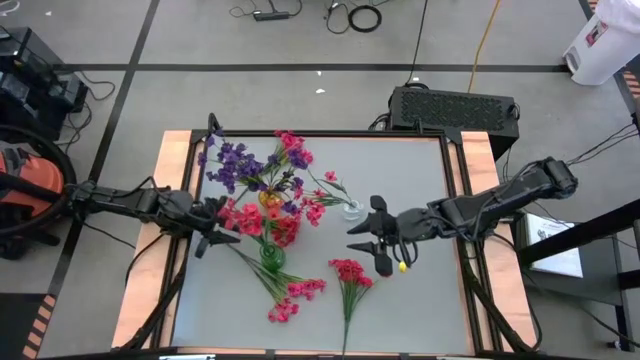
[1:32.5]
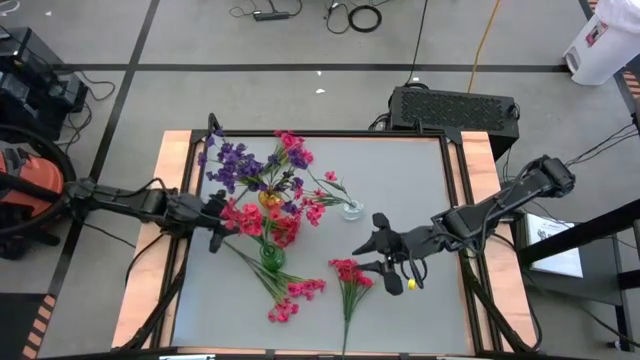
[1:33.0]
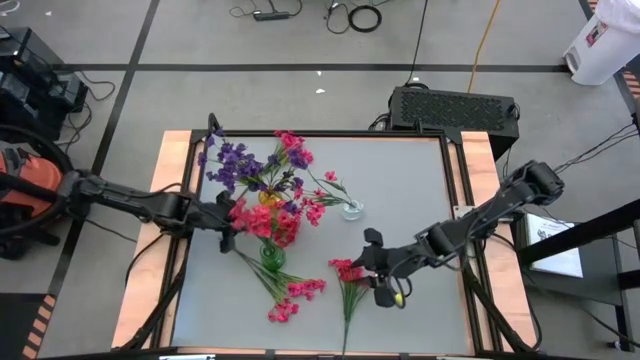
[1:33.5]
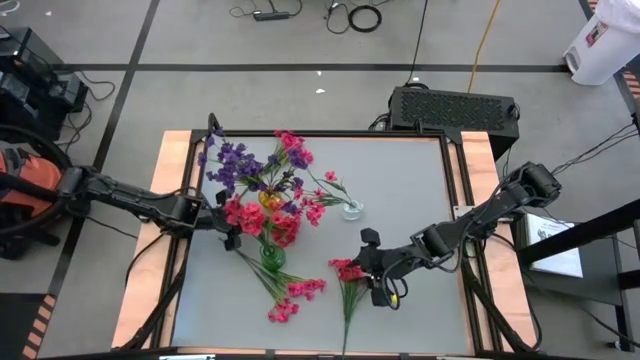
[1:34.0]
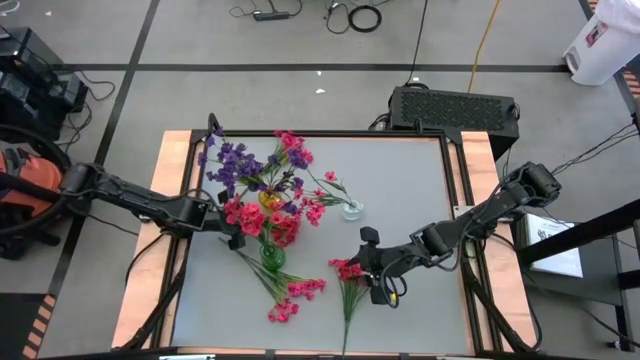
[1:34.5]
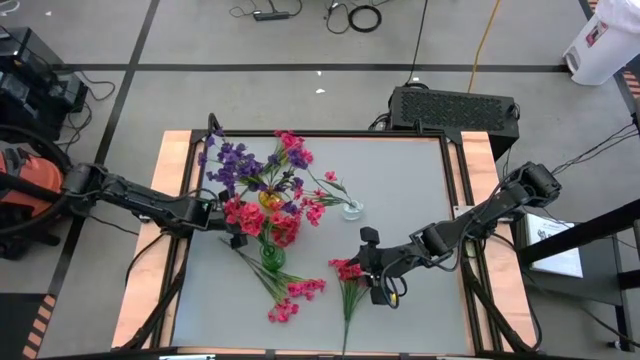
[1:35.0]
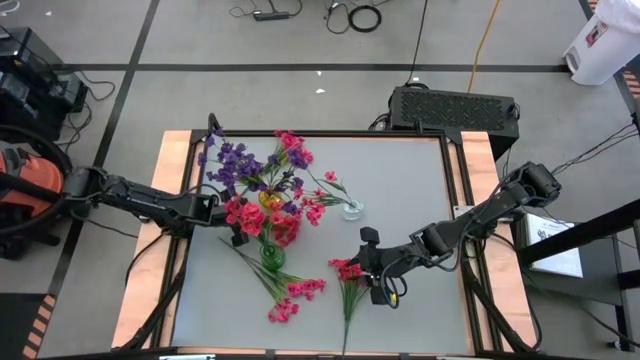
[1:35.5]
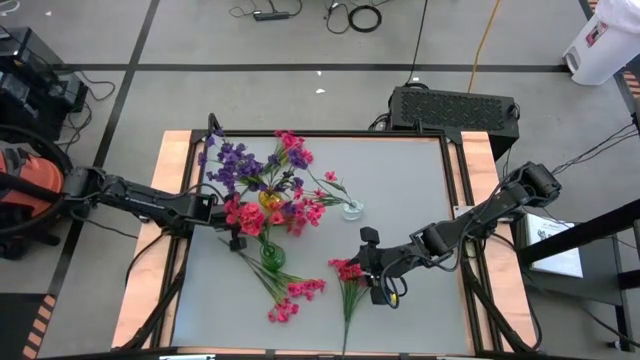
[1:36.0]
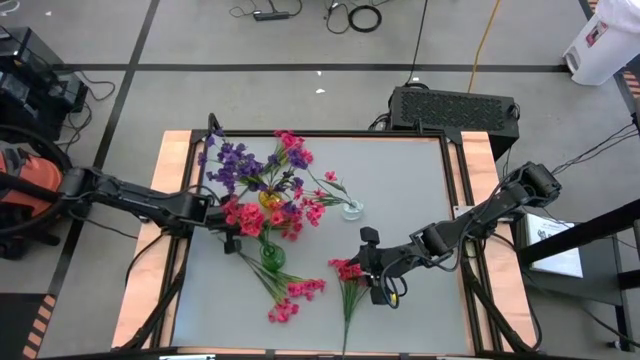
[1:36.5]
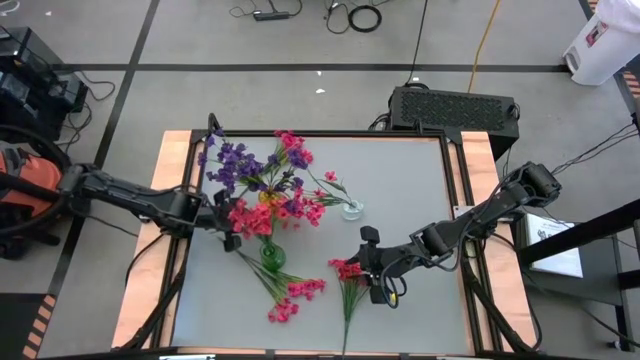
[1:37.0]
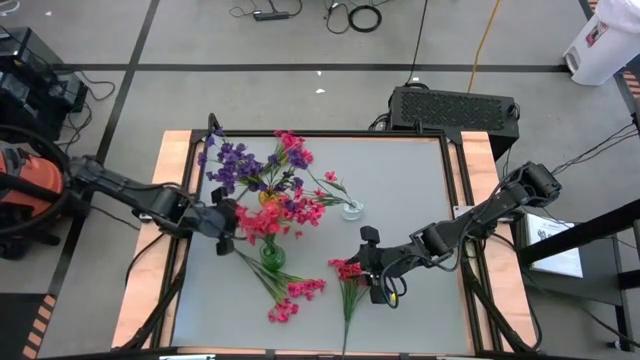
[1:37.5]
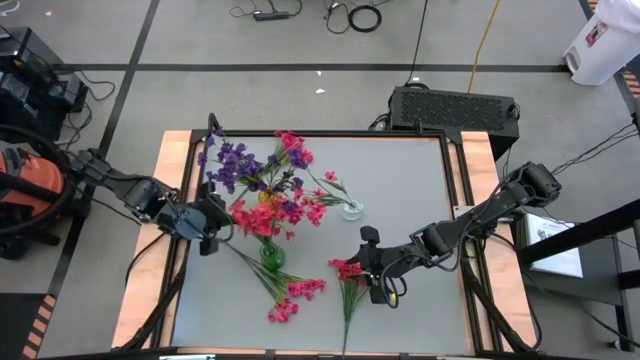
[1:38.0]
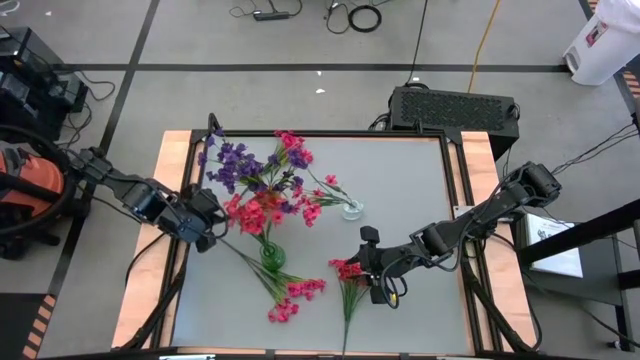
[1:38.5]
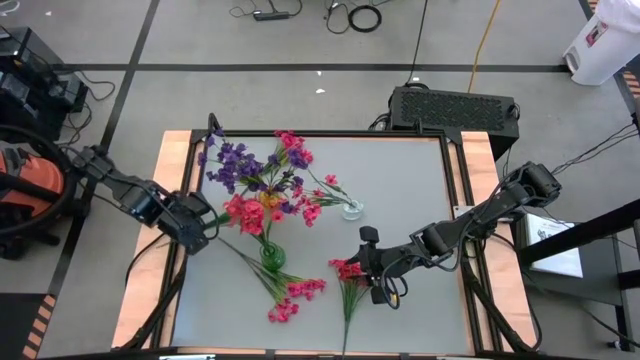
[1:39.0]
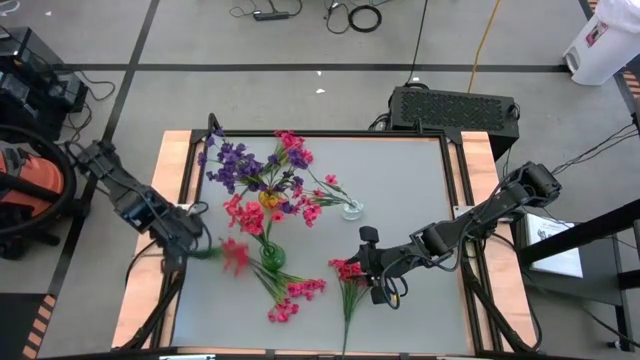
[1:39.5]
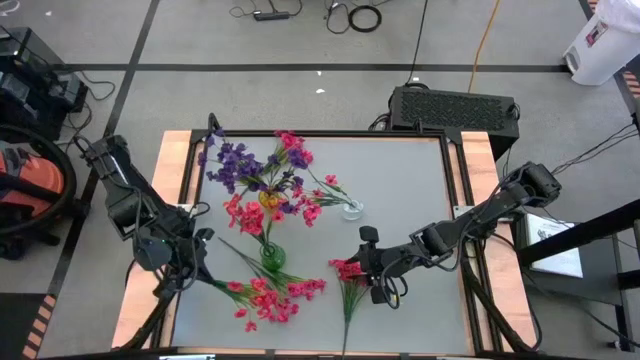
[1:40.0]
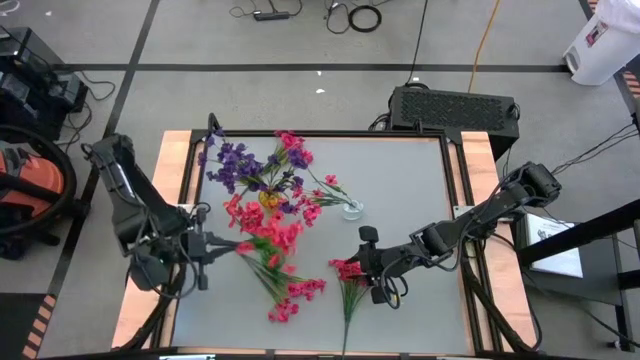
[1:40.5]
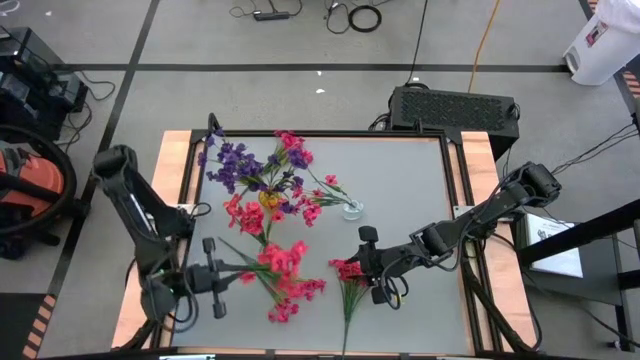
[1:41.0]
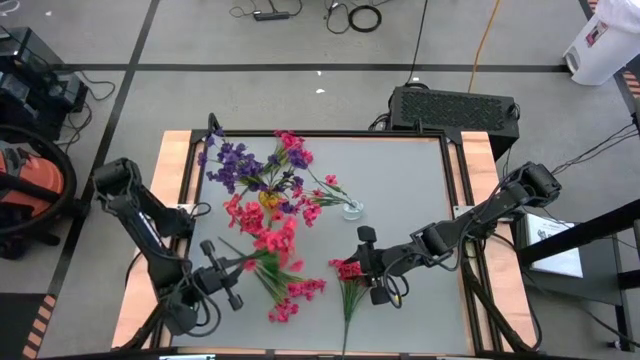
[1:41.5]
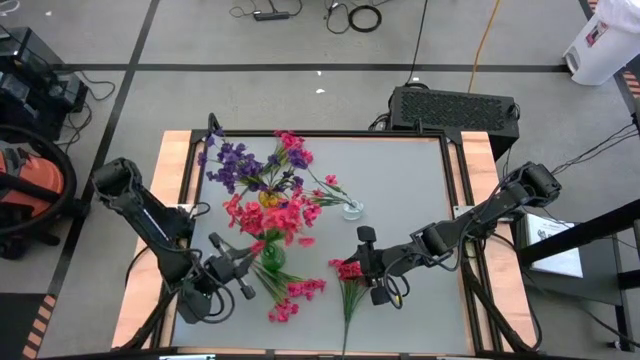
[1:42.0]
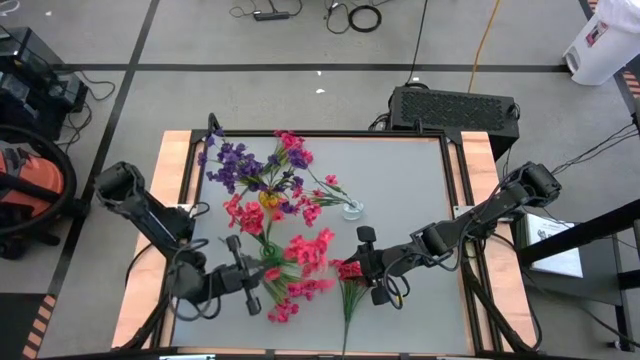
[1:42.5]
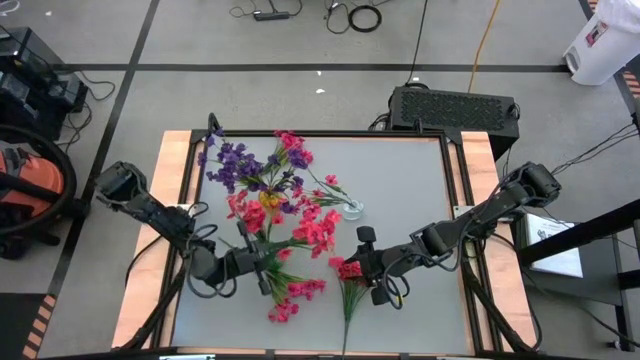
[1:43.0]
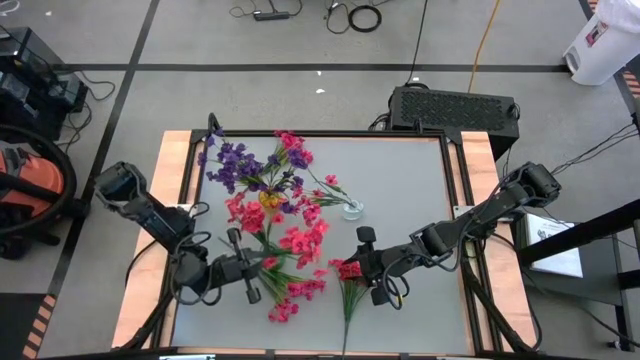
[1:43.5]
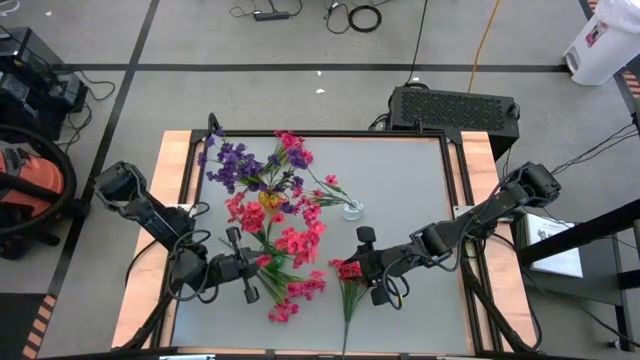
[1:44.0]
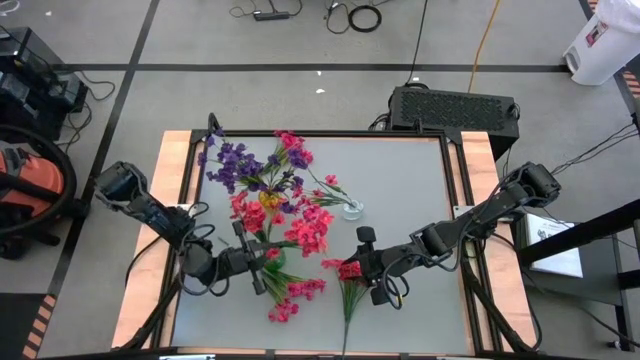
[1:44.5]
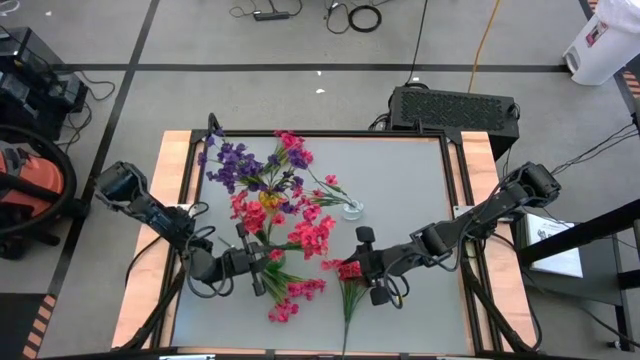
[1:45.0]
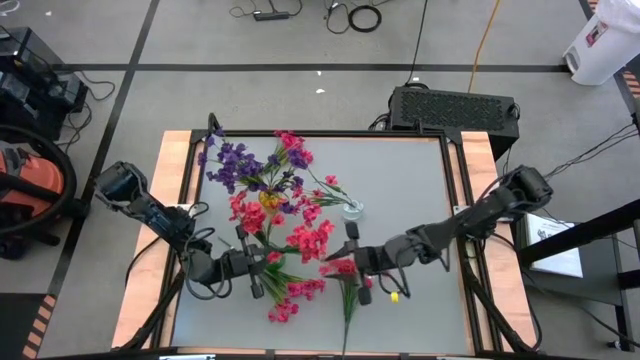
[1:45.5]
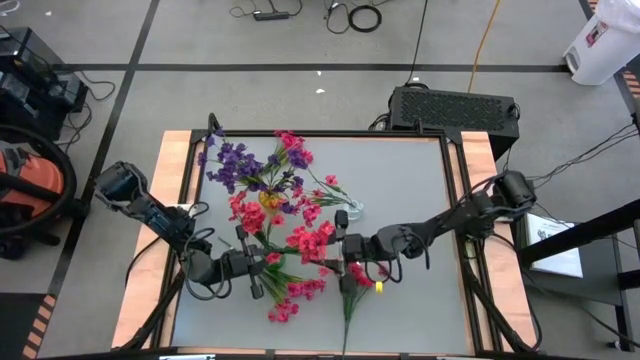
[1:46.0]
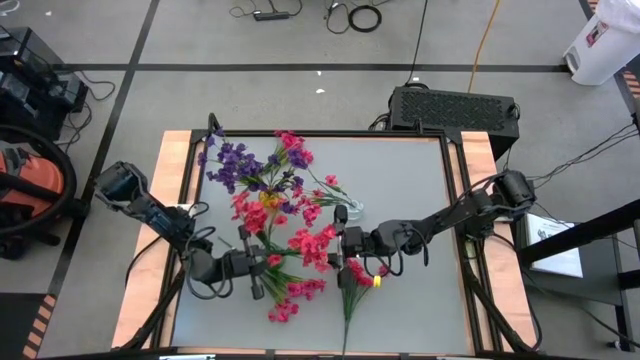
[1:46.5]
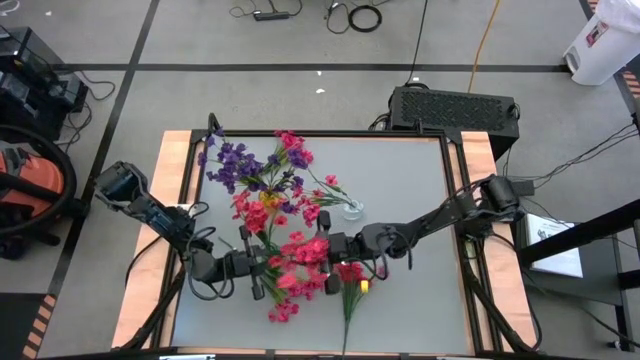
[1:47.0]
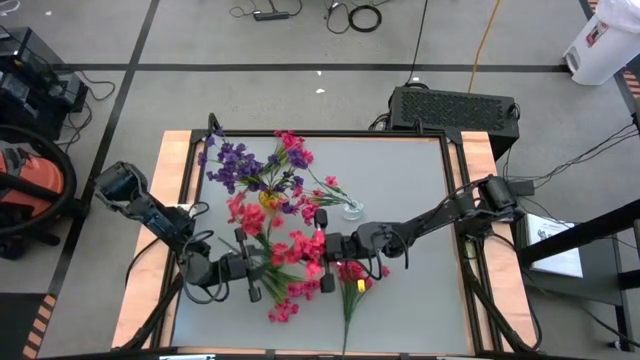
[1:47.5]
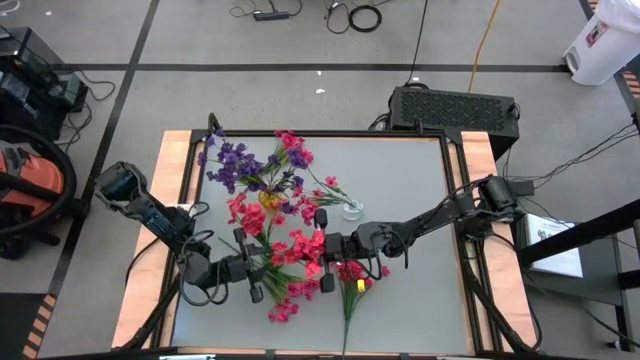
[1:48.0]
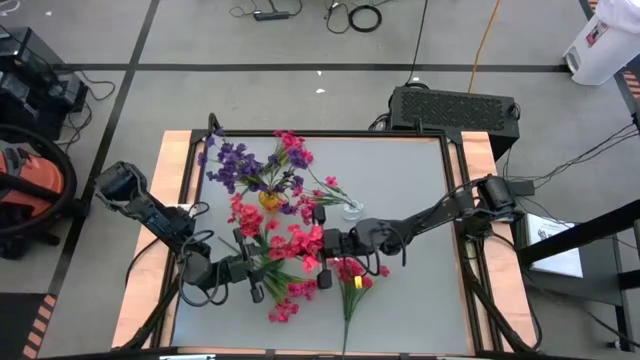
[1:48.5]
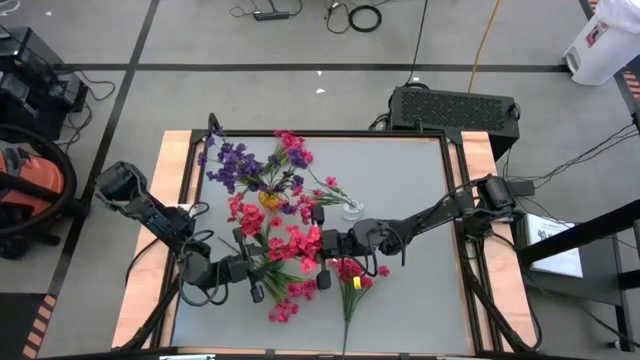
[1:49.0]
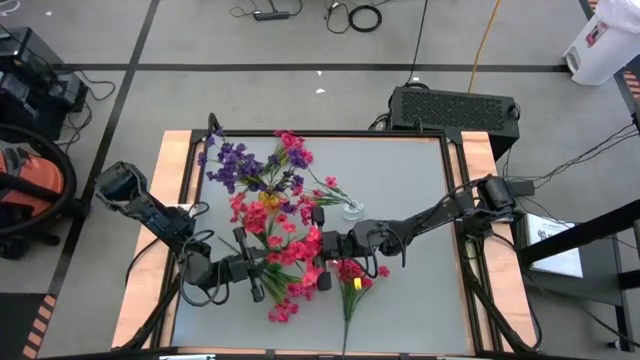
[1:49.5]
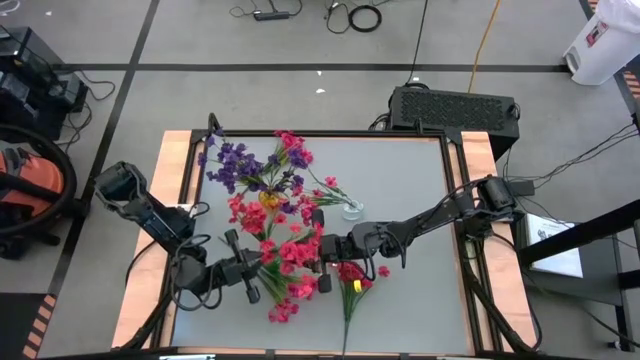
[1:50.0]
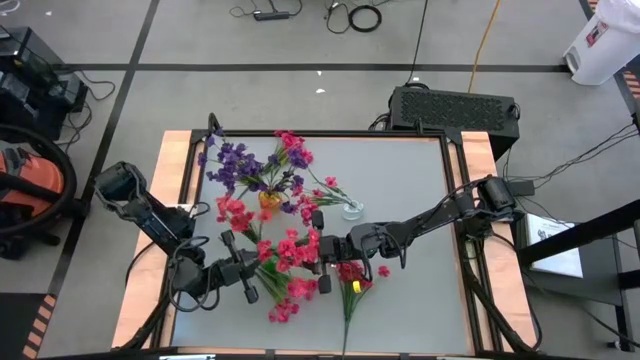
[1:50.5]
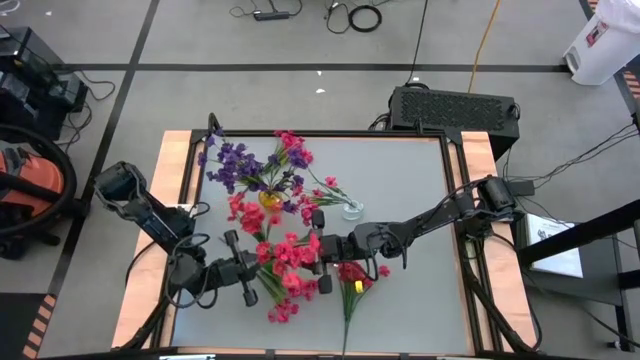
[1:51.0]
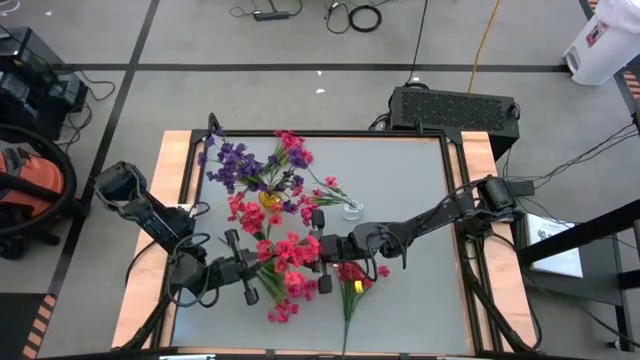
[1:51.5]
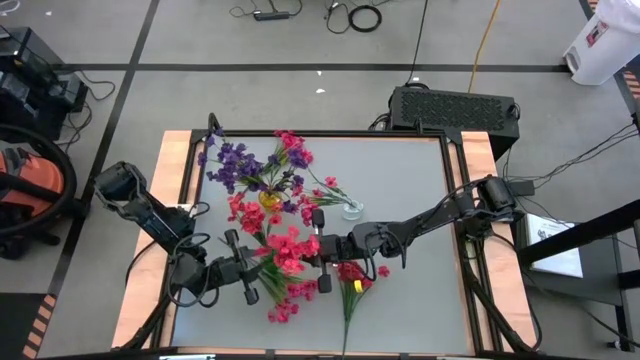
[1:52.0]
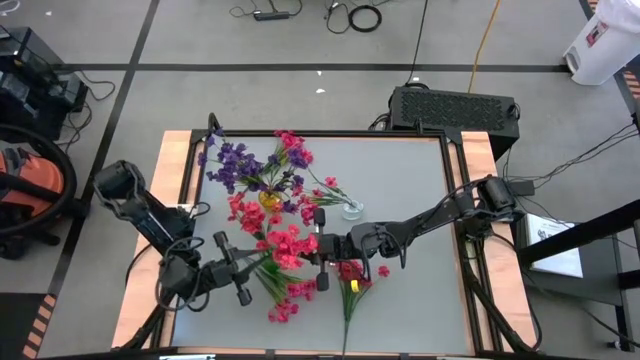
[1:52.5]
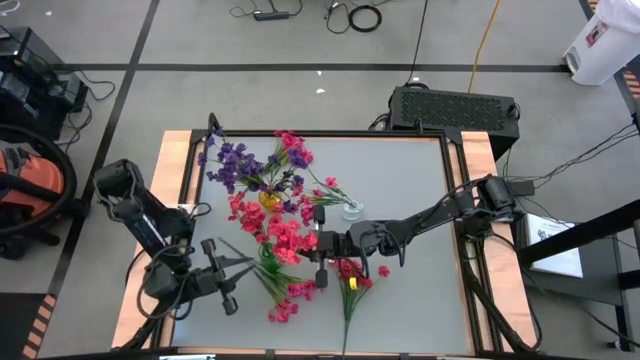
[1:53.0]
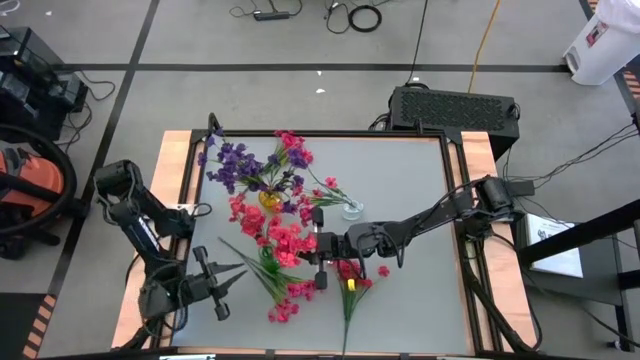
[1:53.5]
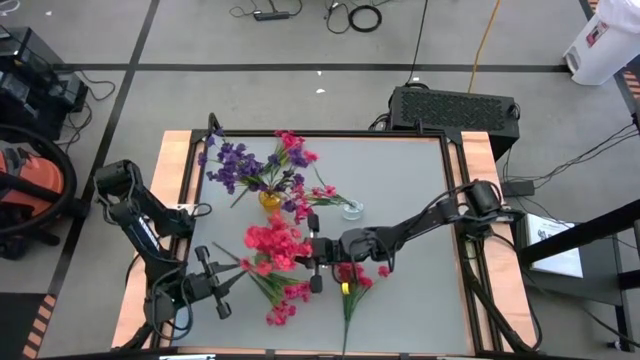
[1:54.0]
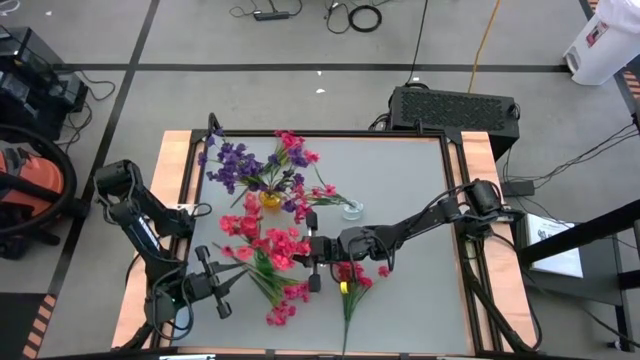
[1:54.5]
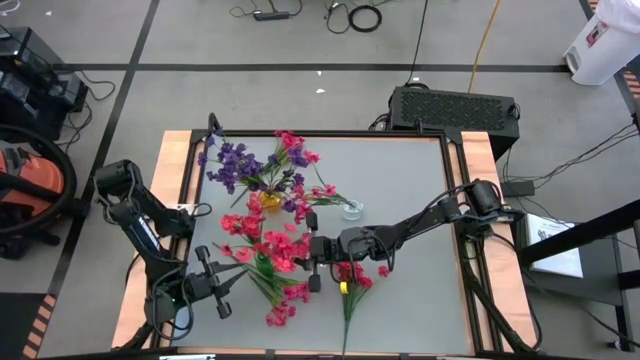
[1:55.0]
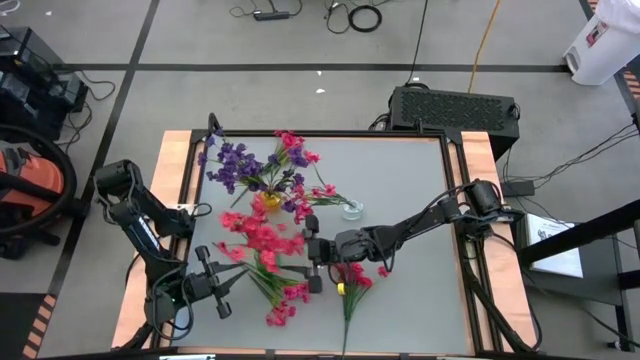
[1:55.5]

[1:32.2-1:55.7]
Task: Sort flowers into vase by color
Put the left orange flowers into the green vase
